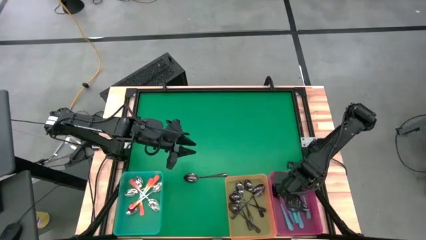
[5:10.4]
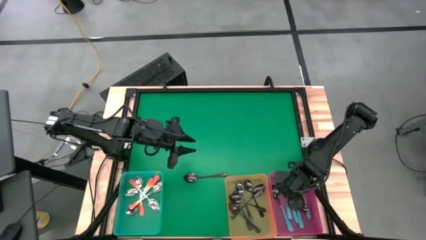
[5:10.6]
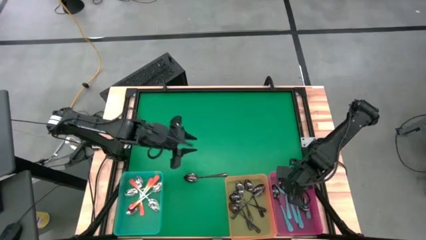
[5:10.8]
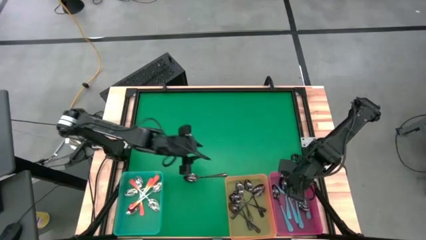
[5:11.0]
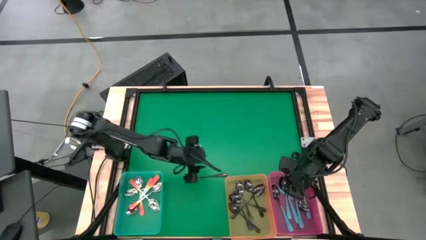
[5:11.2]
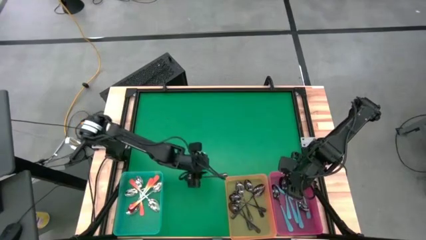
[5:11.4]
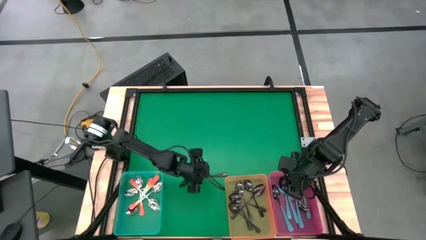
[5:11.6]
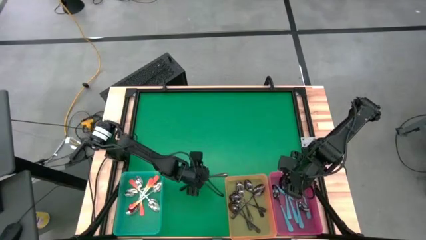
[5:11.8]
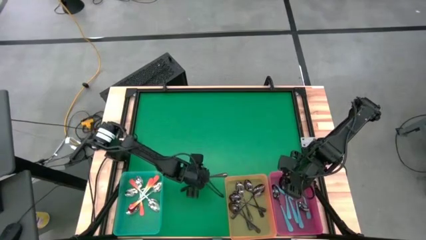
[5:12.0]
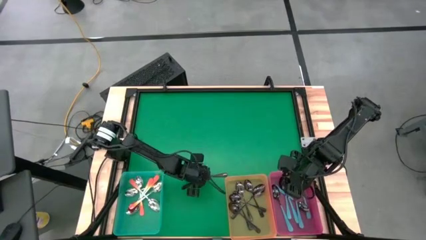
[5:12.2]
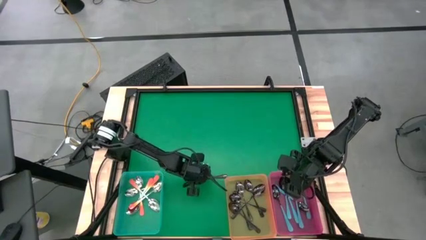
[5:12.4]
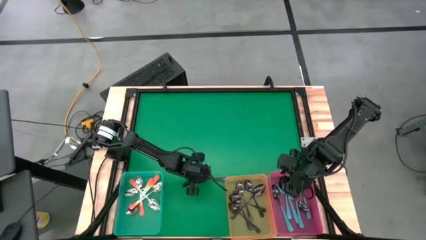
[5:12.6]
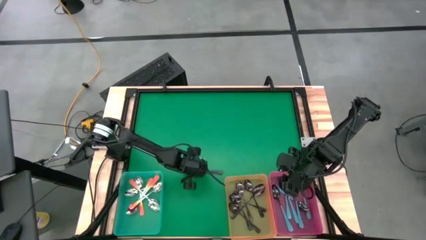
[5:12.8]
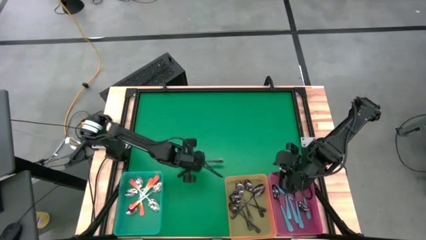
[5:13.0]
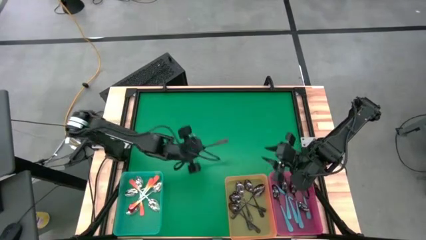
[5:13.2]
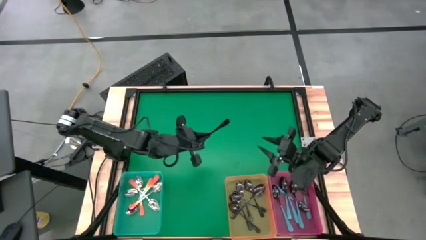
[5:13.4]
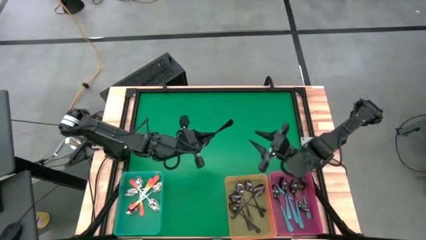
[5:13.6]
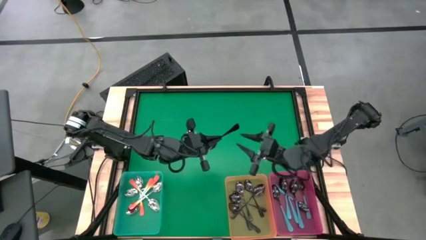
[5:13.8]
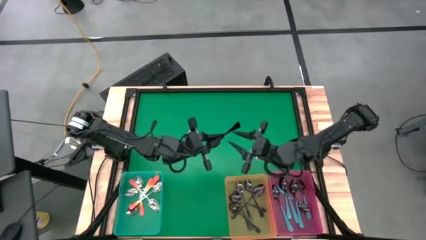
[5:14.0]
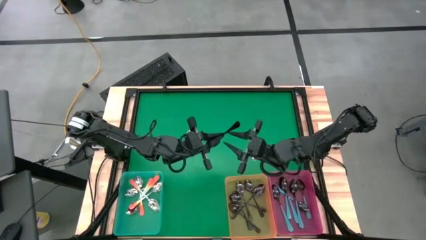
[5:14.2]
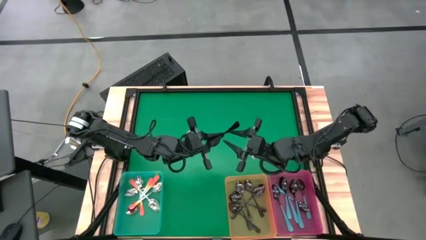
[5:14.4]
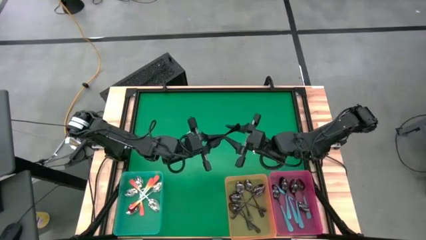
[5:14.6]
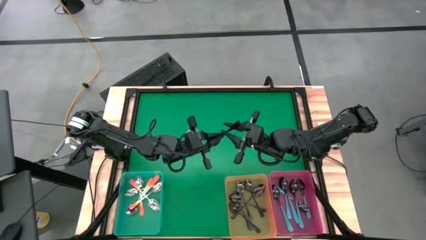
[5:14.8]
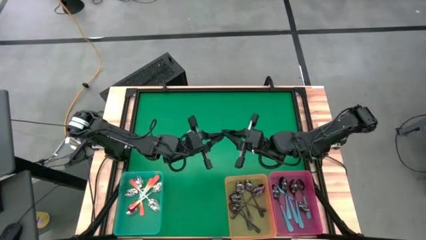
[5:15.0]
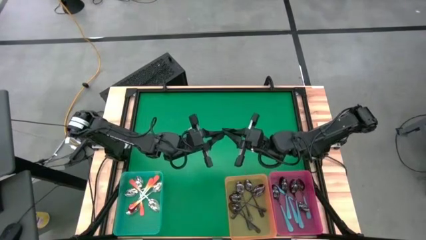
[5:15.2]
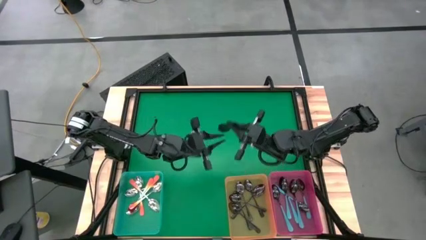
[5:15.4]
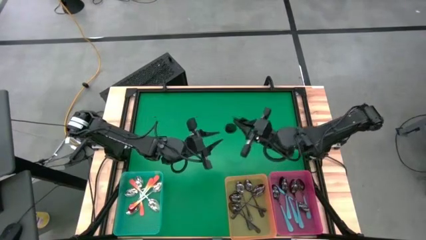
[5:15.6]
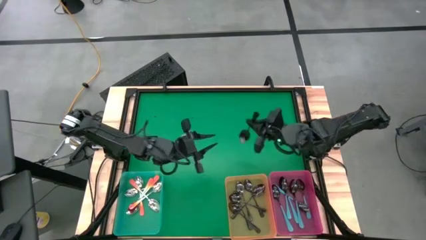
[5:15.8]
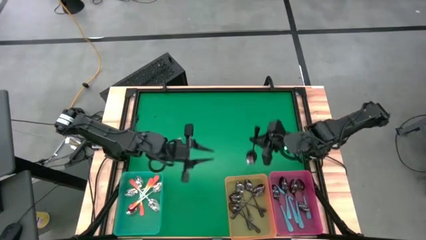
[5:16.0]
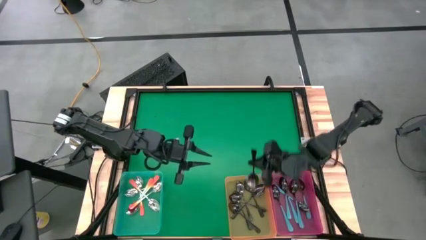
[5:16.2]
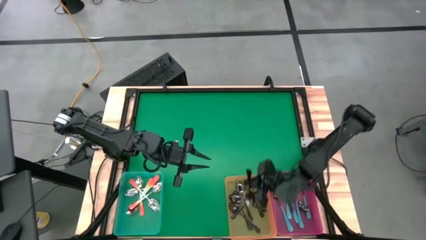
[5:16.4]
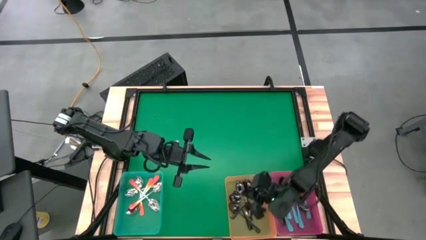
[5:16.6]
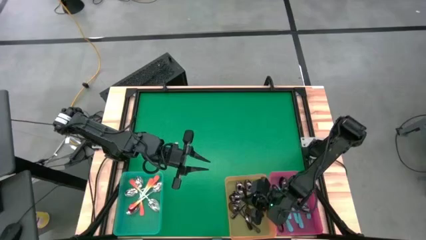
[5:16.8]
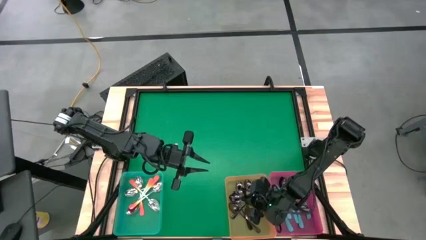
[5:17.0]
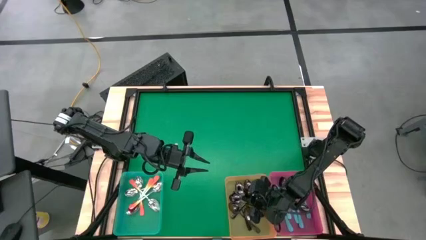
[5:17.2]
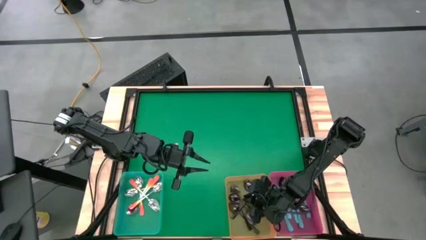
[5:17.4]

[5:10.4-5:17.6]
Task: Sort silverware by color (type)
Put the black spoon into the orange bin

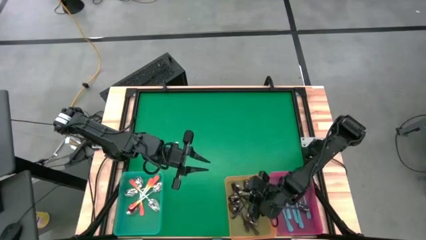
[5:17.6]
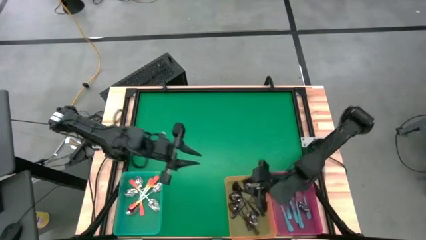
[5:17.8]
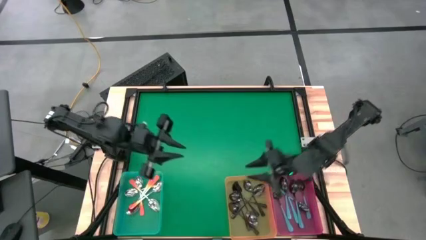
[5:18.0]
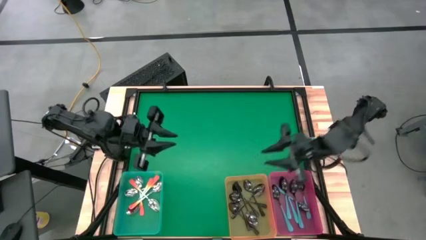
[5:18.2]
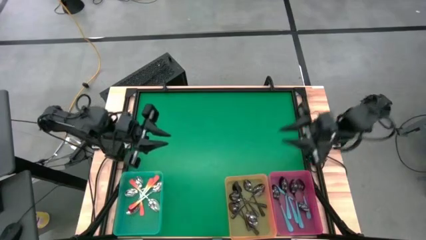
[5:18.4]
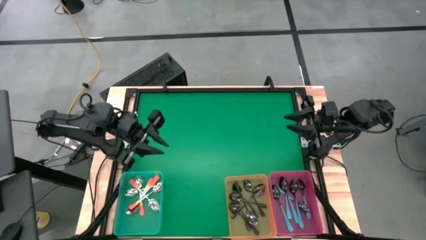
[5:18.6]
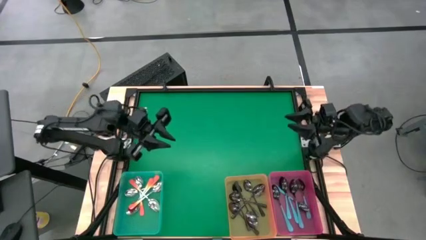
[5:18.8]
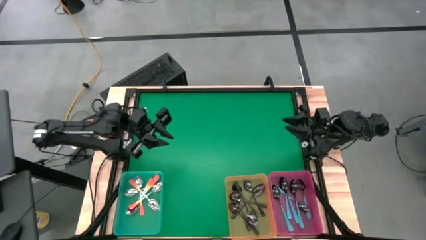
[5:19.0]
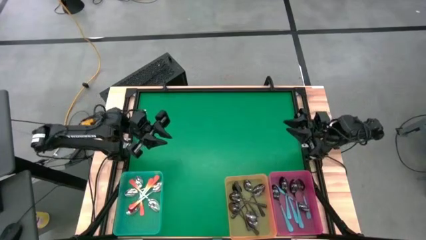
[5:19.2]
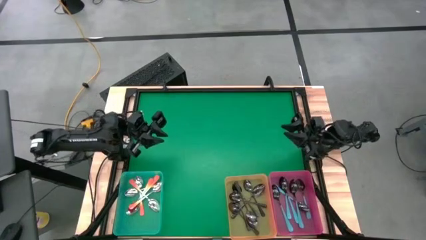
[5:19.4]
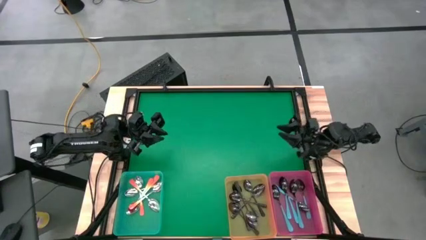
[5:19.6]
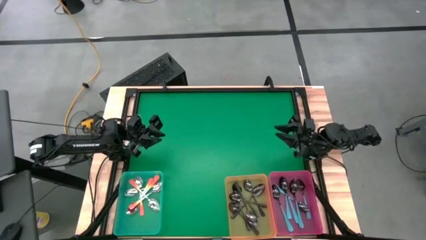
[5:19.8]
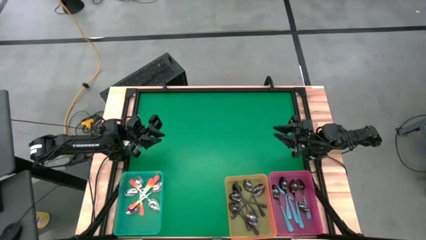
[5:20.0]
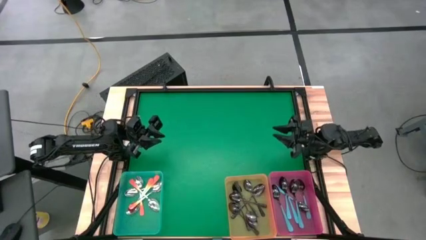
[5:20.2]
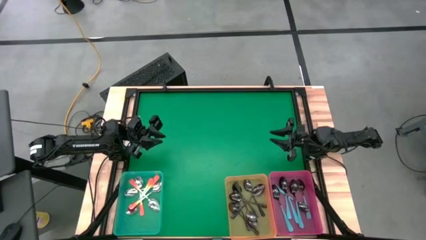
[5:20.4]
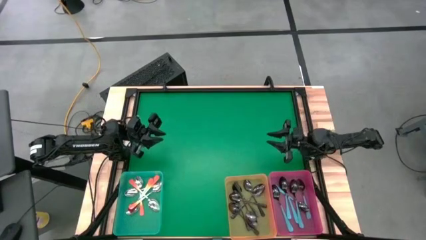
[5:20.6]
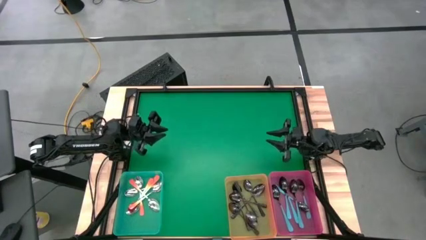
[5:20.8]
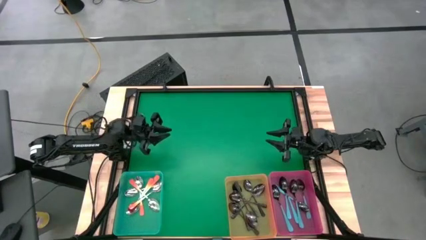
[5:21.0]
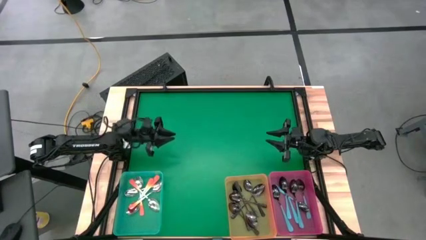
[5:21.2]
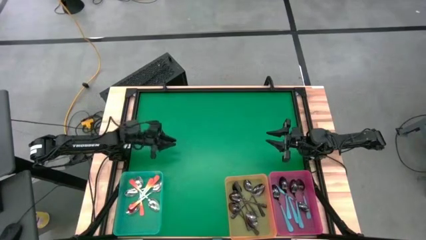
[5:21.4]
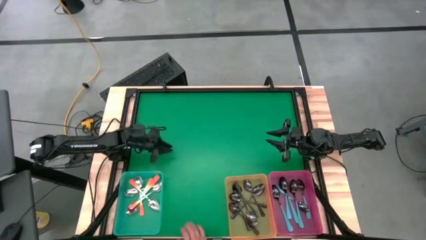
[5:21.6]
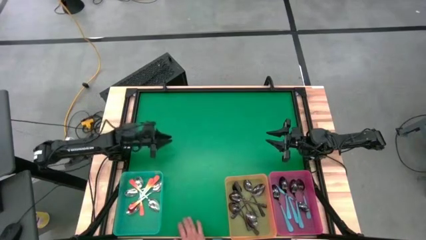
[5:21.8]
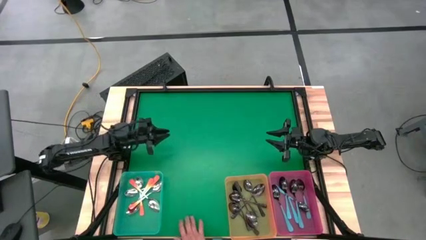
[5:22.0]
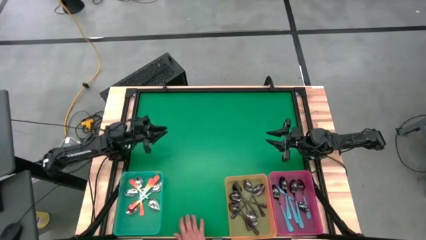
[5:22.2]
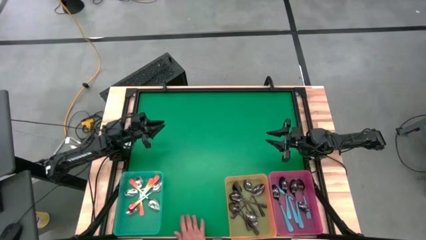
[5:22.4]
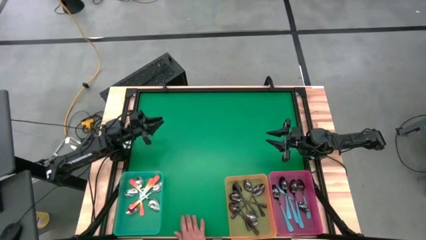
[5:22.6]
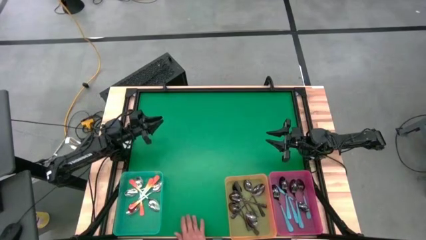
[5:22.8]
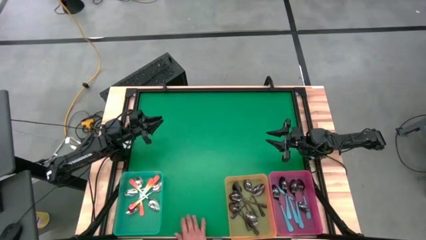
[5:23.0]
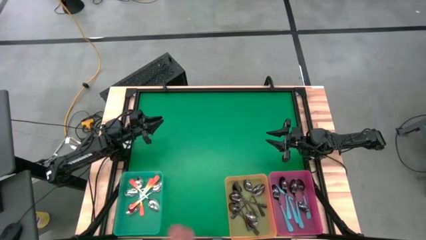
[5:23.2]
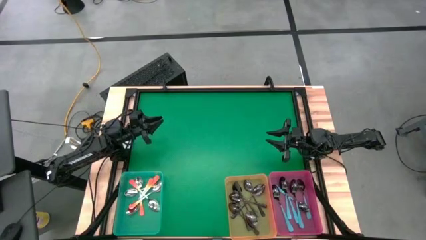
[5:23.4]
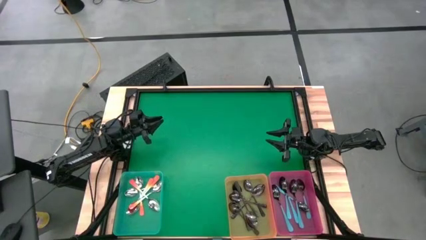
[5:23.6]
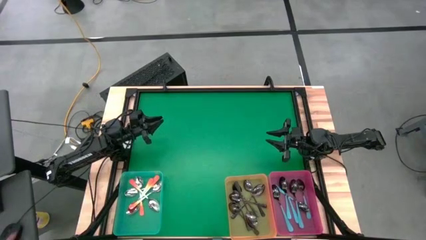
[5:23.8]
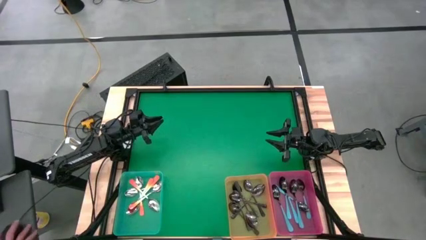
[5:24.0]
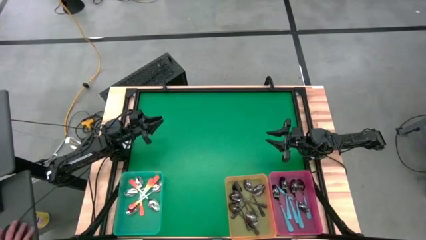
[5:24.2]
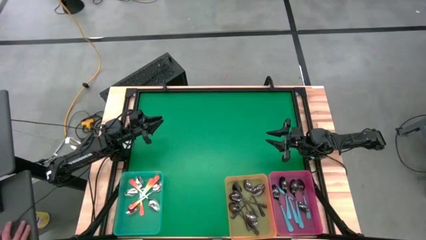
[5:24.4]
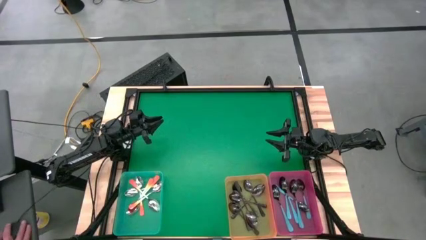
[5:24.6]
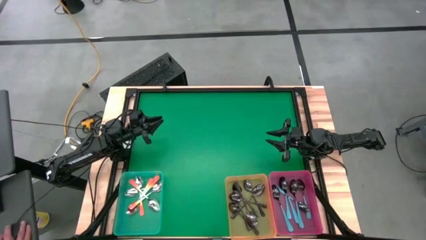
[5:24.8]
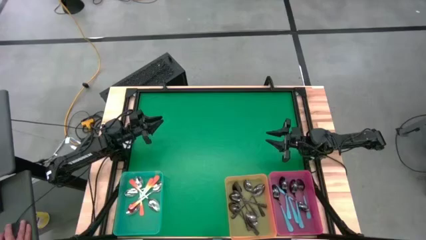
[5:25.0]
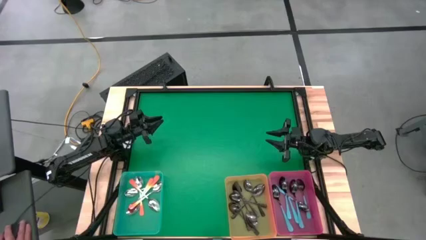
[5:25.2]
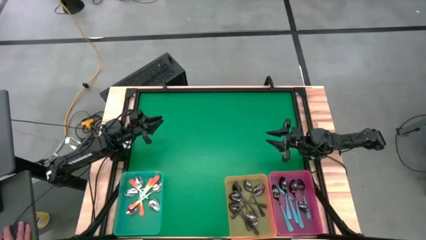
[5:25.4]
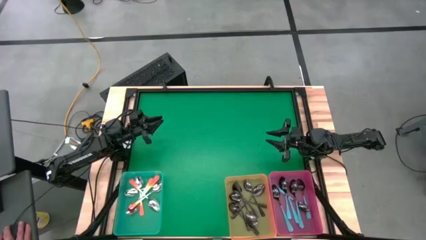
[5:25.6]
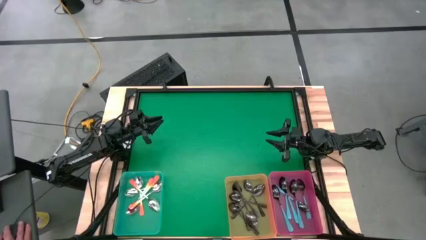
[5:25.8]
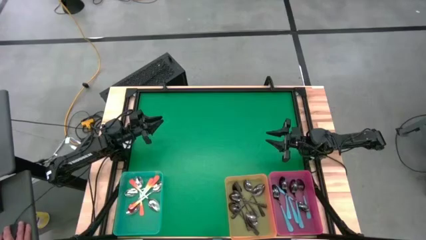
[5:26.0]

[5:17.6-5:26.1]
Return to Home Position
